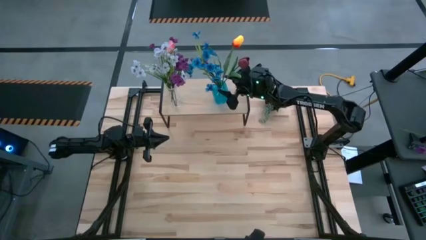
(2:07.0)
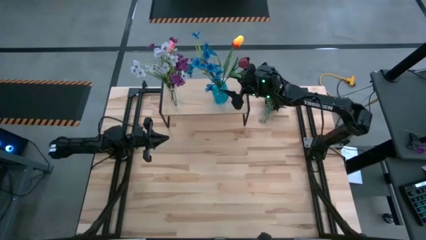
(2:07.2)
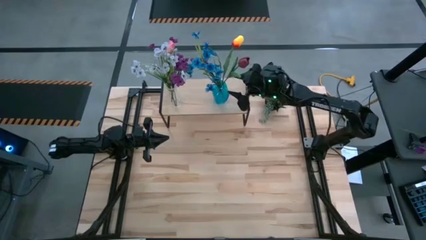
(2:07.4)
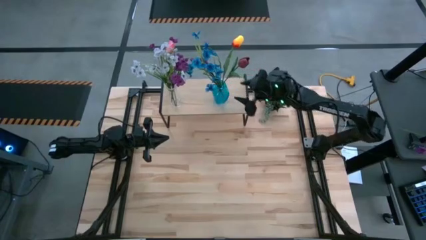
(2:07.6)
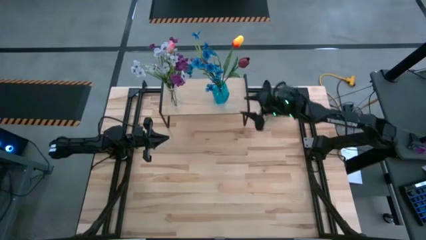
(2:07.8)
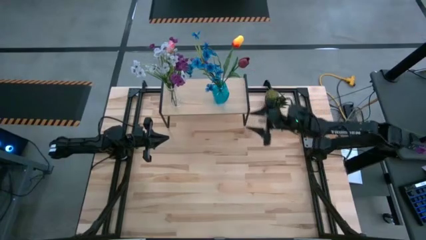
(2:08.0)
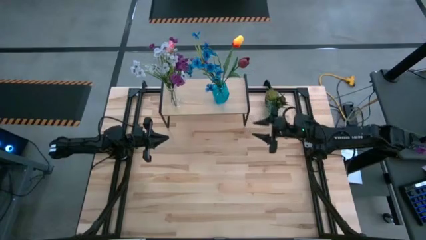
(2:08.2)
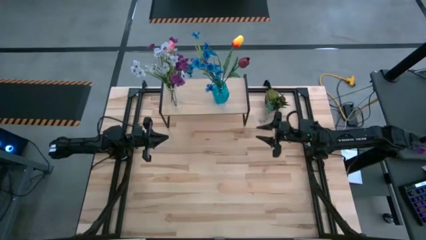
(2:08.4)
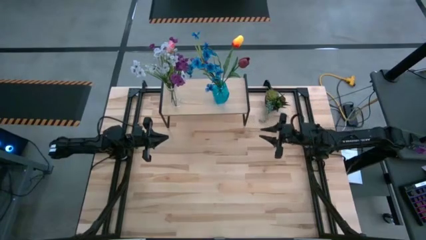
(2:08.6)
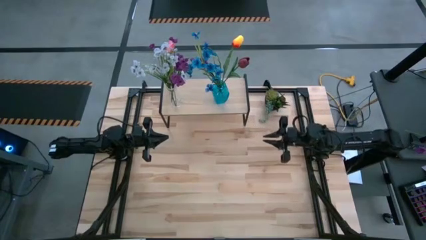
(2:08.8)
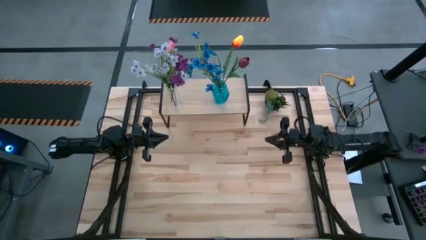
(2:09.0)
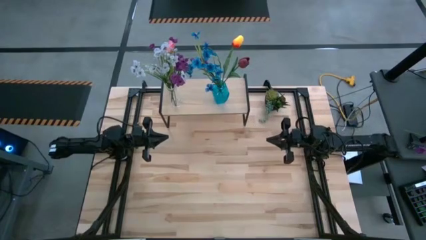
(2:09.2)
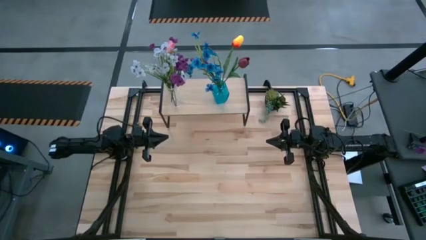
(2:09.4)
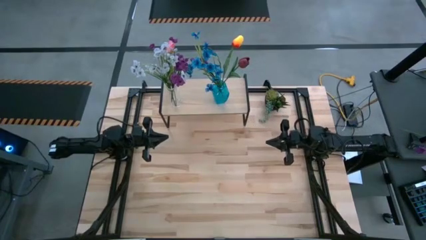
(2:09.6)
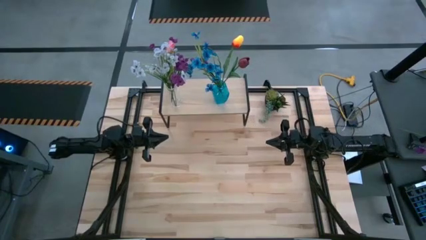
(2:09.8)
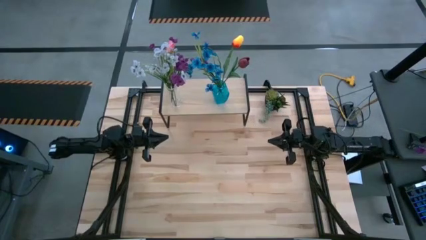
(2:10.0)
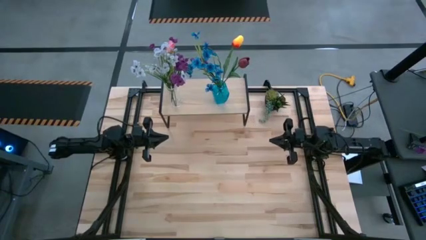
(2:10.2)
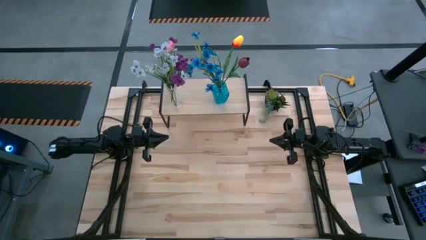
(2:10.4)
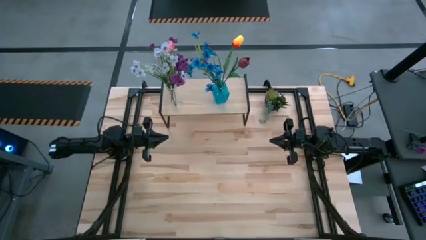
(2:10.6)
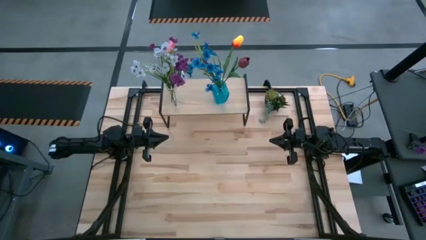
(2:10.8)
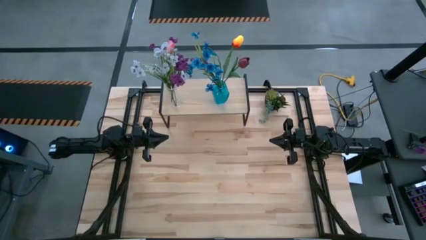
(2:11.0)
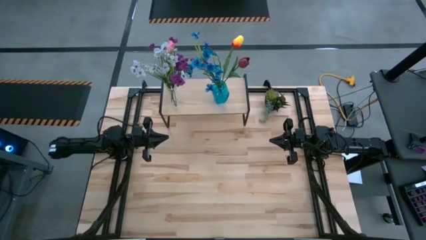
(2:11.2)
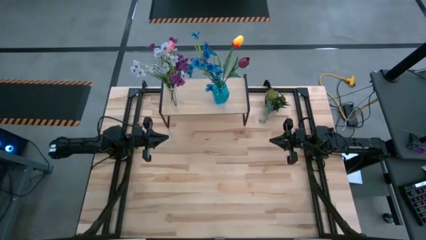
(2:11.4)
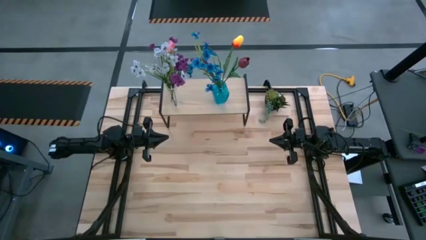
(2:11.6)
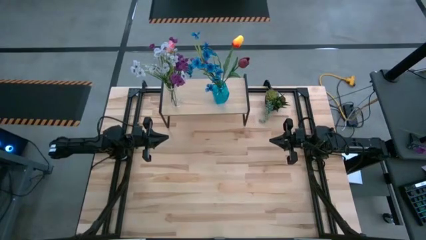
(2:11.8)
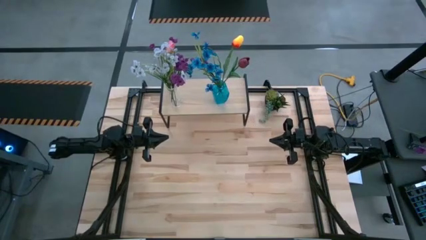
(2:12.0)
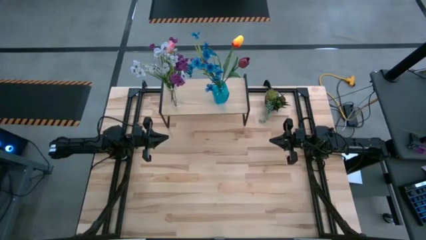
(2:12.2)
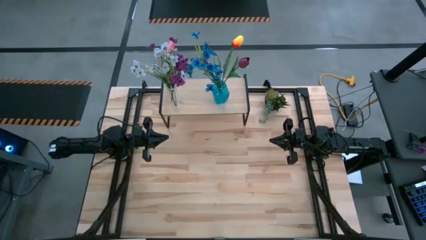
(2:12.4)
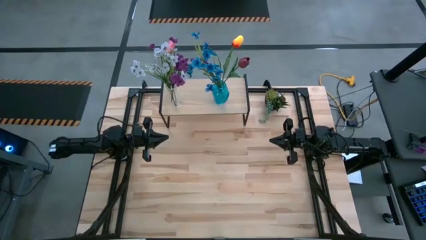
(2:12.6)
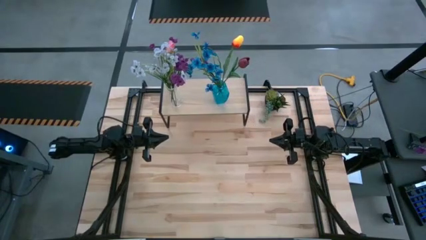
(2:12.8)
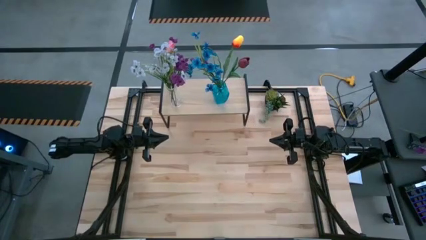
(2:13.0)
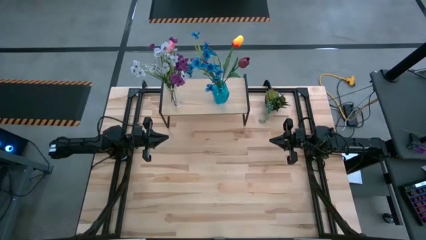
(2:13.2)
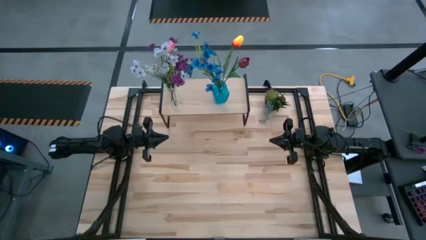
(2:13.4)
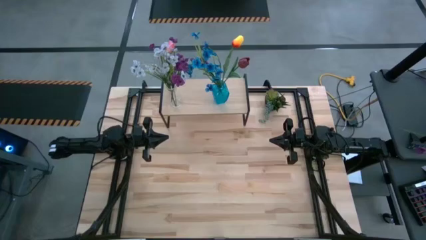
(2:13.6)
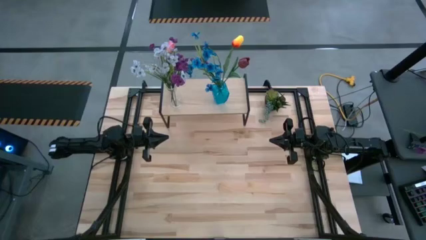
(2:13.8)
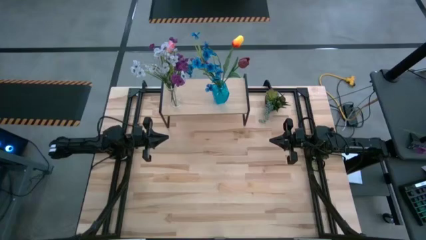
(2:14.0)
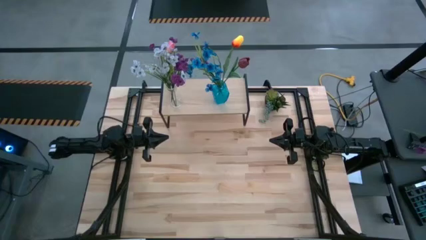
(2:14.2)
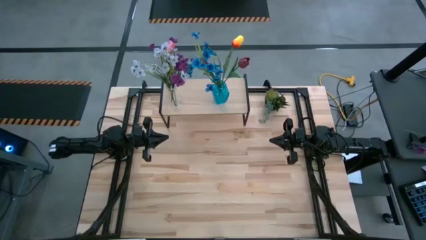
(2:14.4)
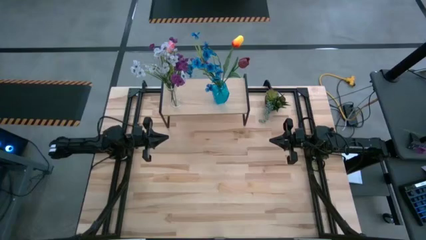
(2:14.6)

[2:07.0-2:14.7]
Task: Pick and place flowers into a vace then onto a shelf
Return to Home Position

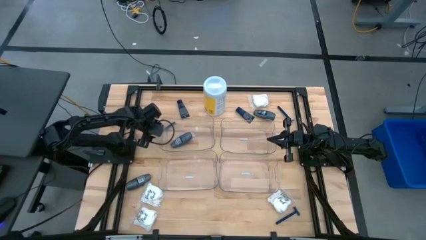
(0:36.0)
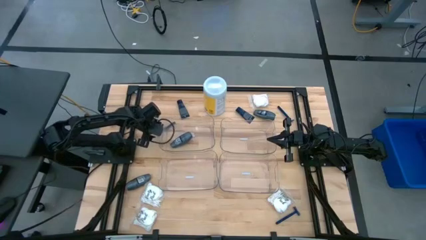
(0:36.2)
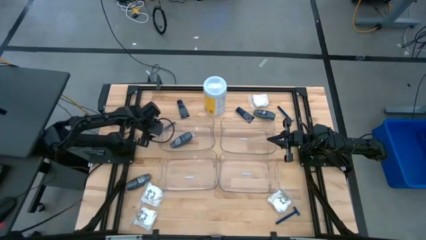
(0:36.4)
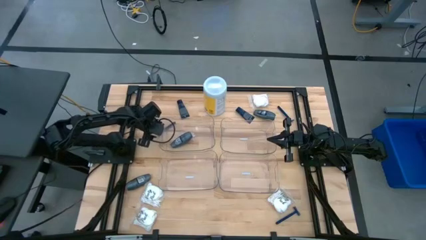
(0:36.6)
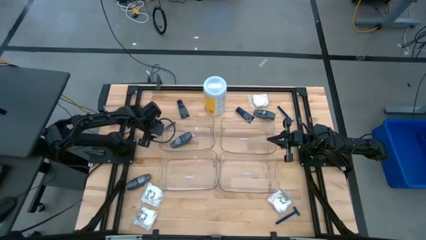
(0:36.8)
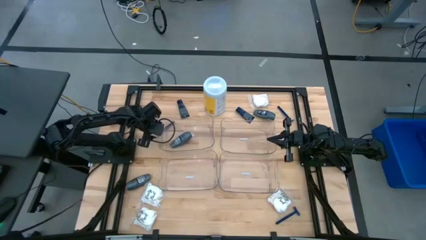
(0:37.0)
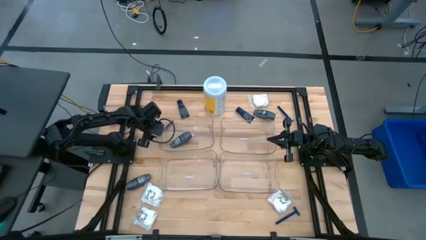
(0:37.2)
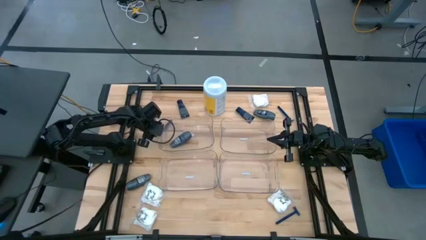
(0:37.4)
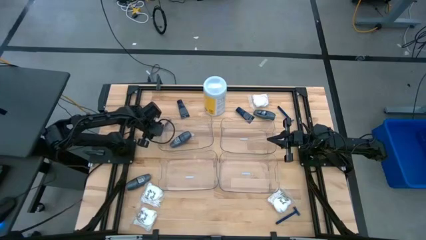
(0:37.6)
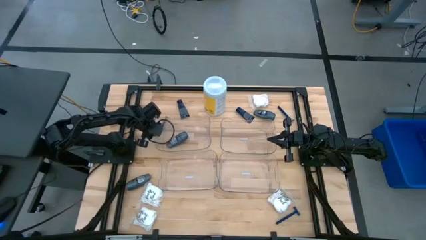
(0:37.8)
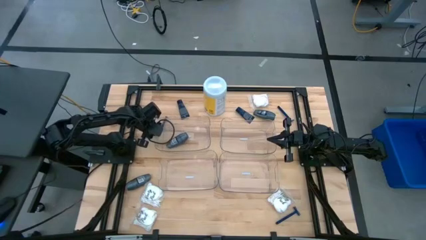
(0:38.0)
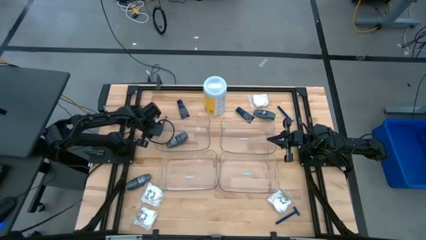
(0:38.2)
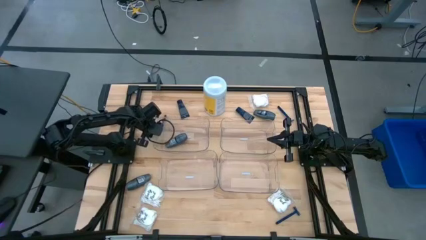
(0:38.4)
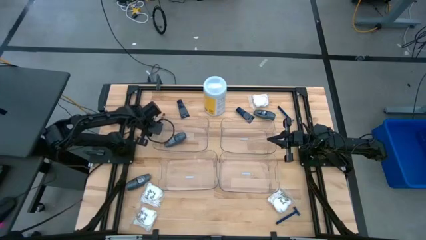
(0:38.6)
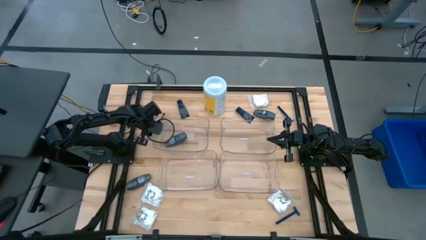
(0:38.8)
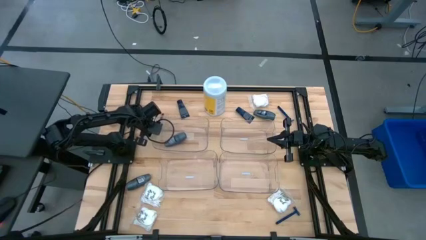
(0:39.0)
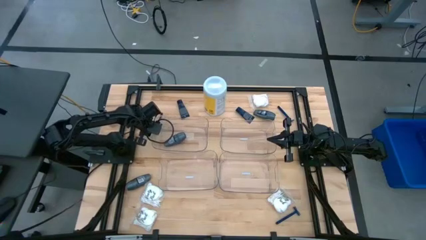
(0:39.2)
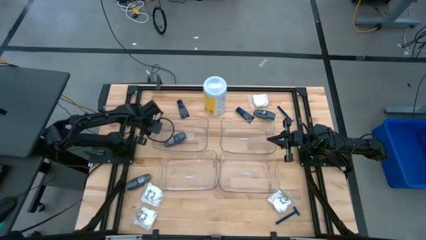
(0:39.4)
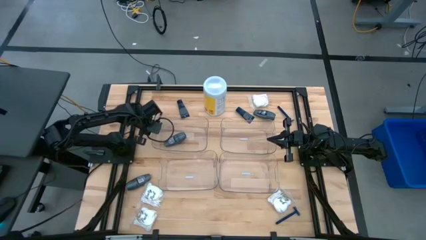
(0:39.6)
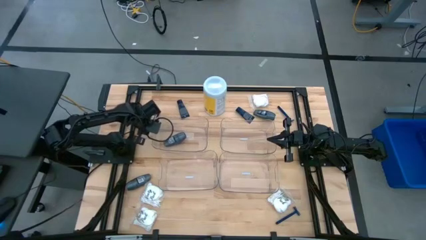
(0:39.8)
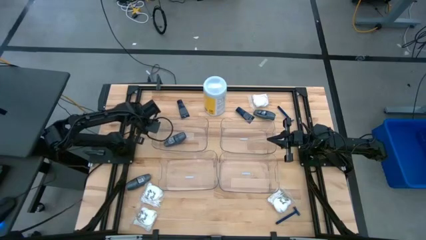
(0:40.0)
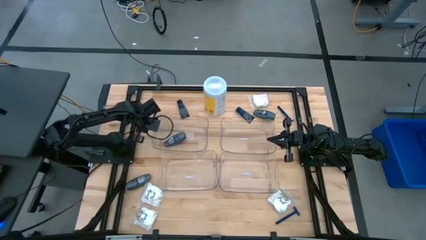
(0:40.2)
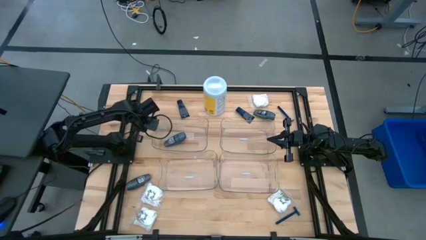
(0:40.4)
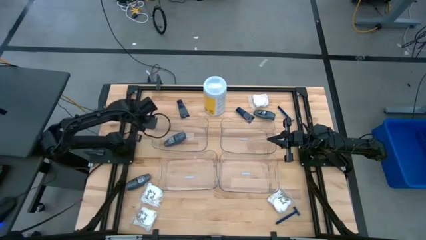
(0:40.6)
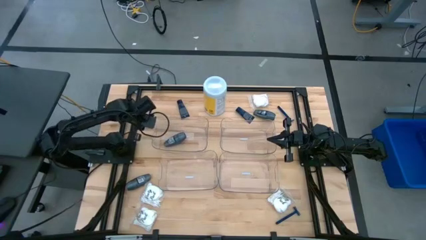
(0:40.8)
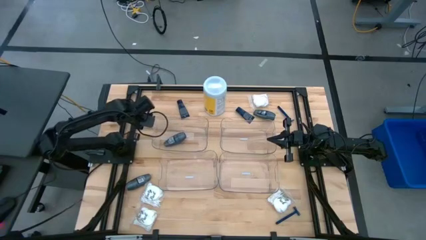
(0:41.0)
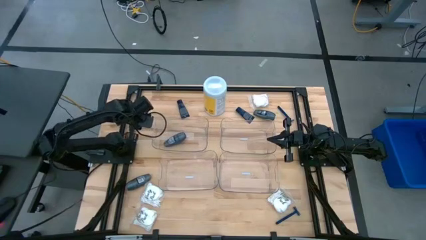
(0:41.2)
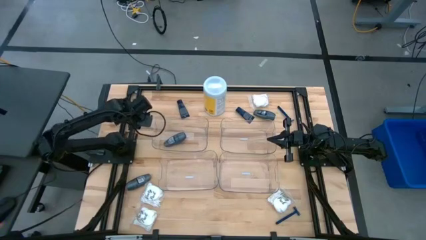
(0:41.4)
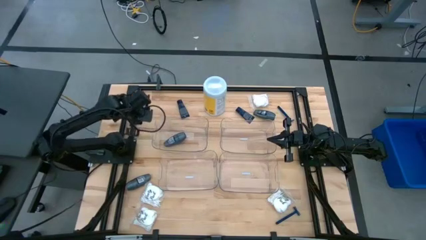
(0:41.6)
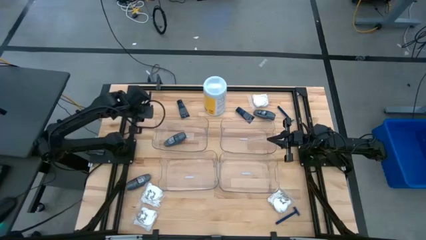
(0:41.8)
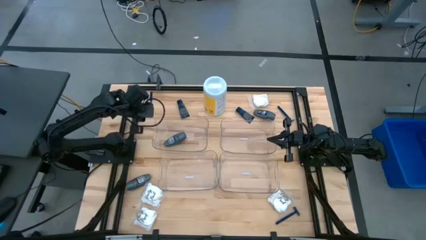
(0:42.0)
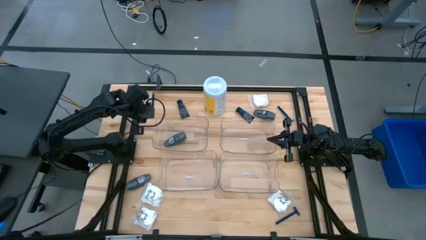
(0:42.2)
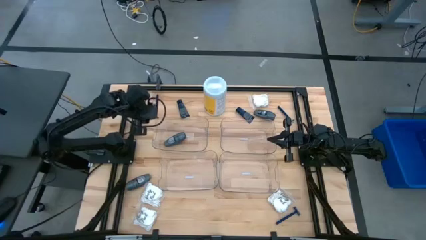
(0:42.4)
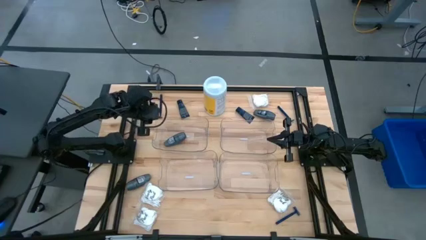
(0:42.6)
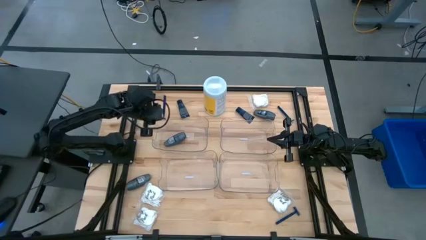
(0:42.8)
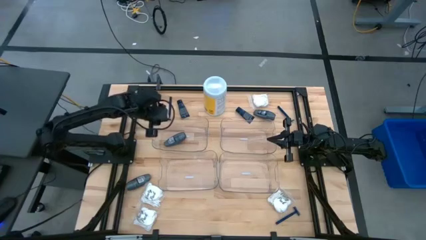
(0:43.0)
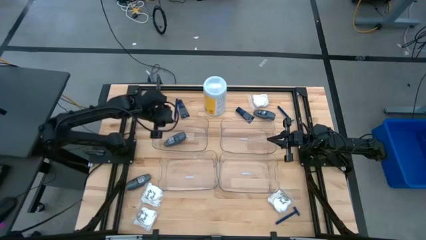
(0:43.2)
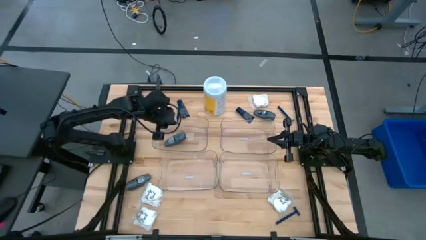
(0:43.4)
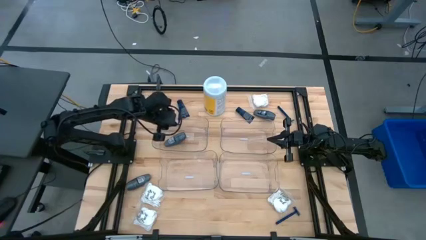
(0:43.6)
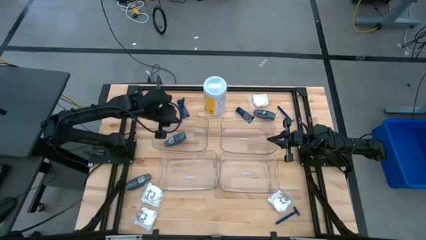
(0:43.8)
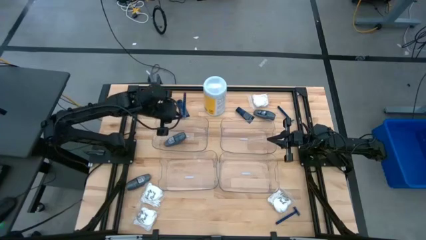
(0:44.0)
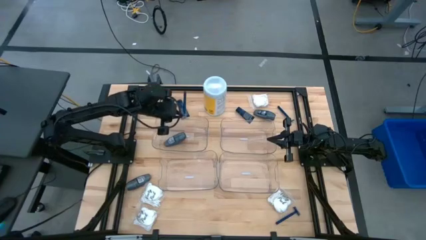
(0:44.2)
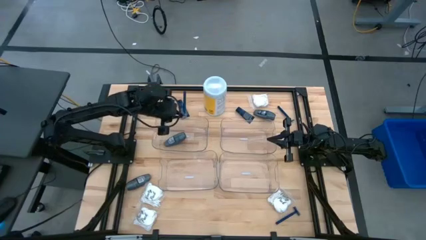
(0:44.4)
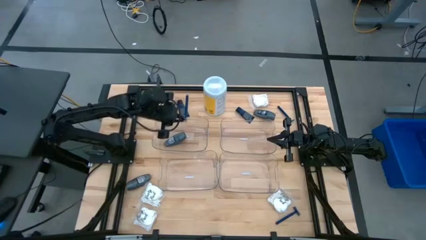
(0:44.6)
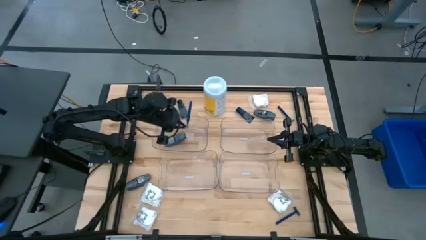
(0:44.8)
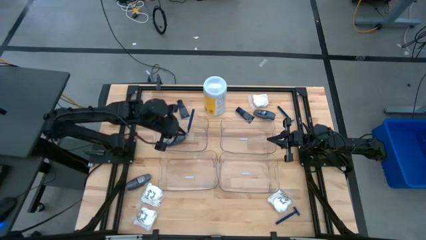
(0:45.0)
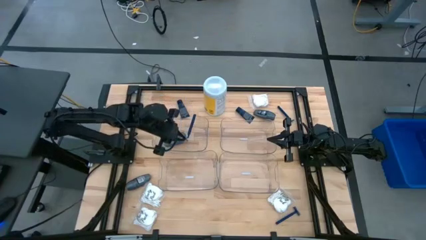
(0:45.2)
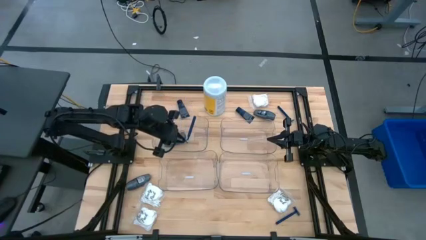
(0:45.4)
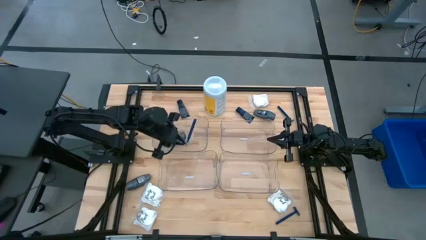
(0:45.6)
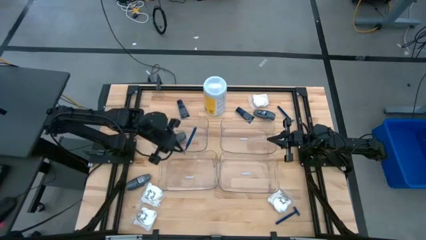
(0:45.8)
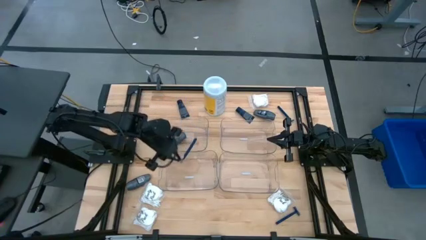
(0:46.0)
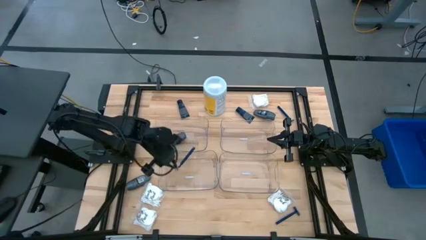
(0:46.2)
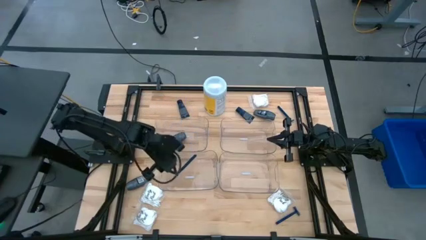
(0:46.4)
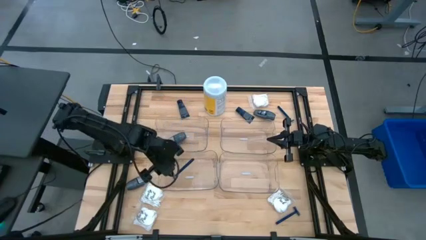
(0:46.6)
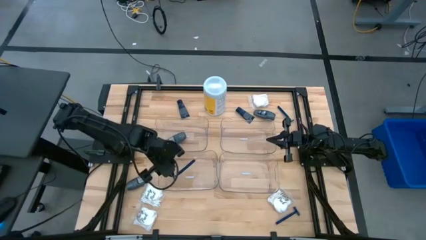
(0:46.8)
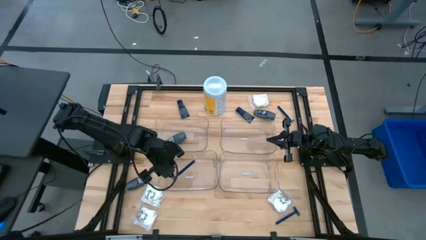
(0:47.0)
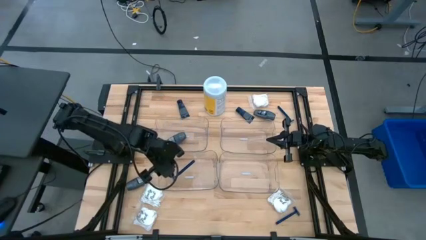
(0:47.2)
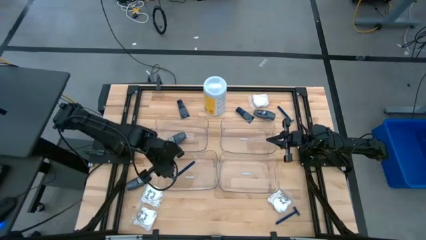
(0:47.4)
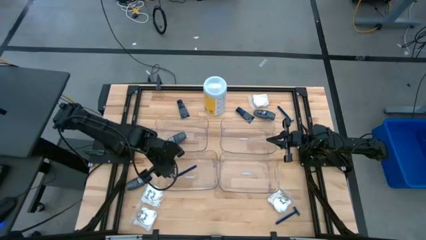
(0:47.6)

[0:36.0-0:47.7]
Task: Pick & Place Travel size toiletries
Put the left blue shaver into the bottom left transparent bin
